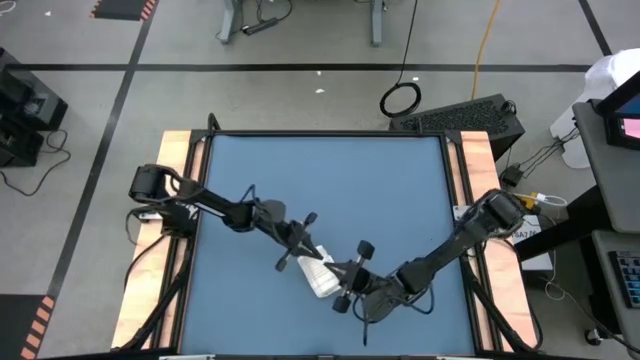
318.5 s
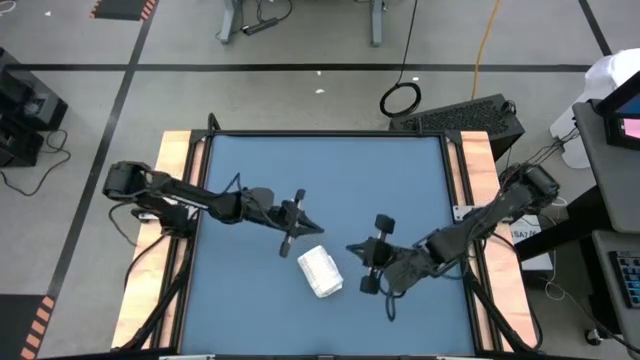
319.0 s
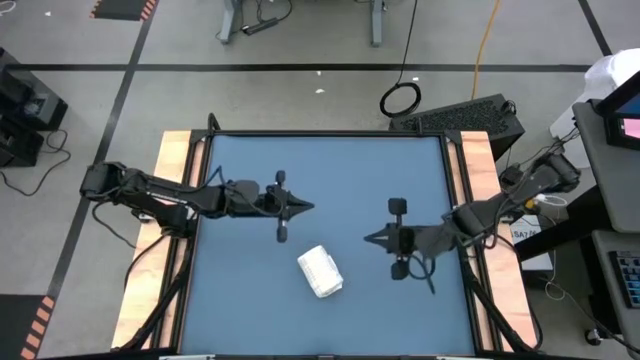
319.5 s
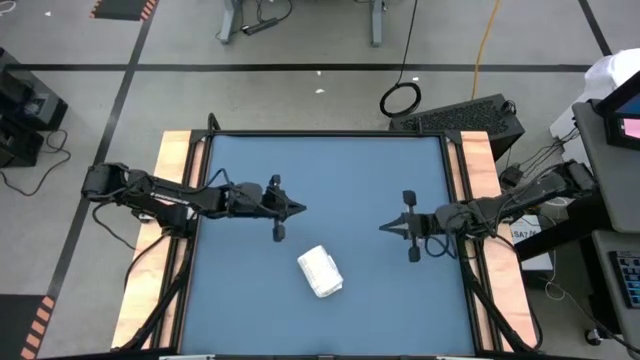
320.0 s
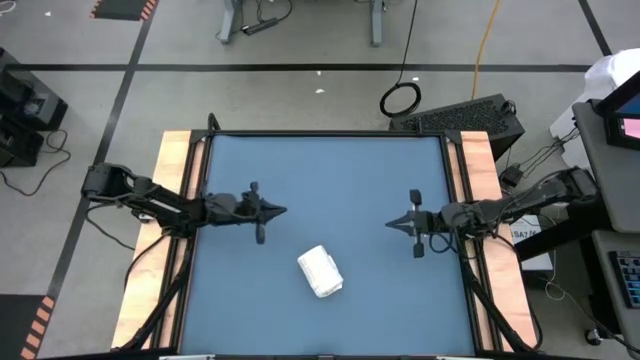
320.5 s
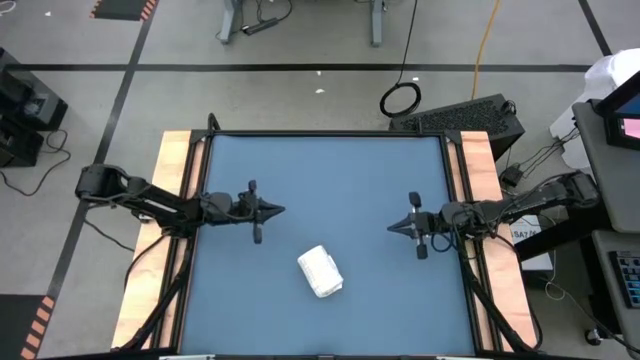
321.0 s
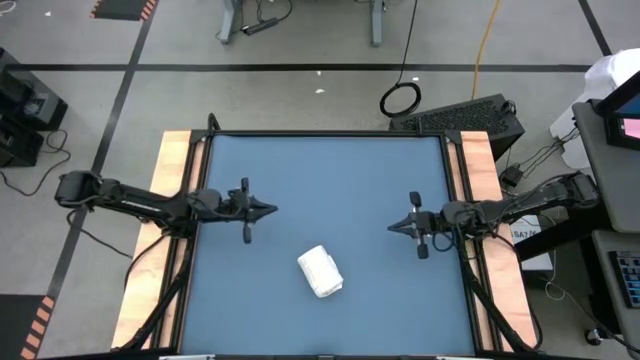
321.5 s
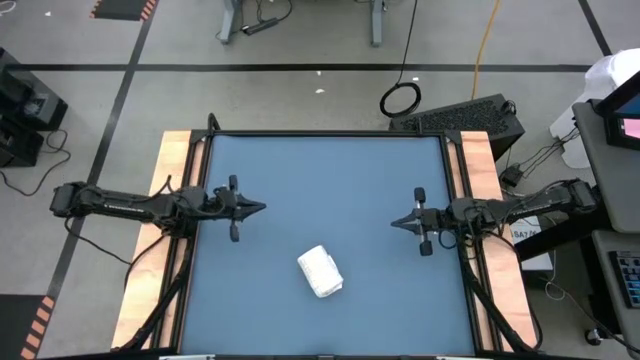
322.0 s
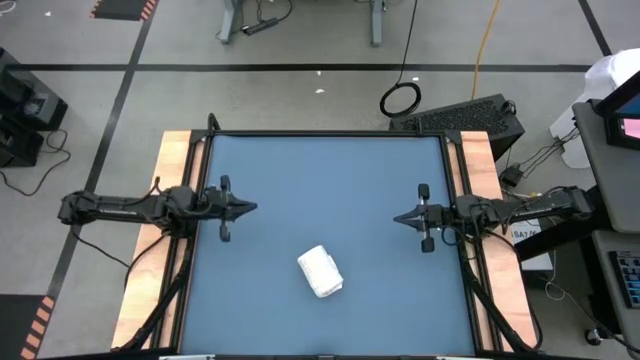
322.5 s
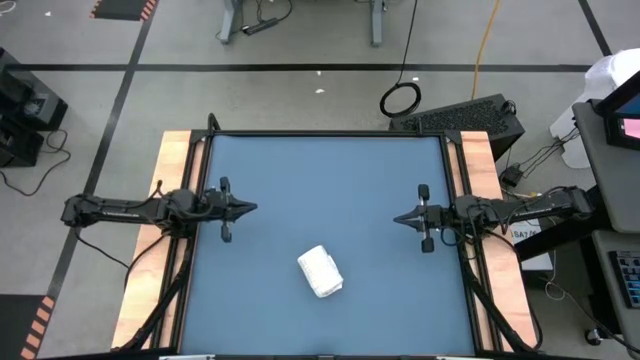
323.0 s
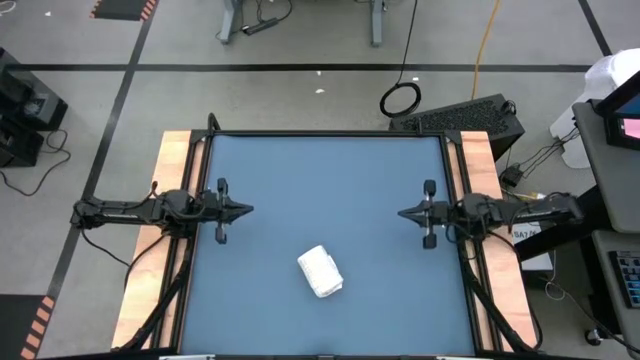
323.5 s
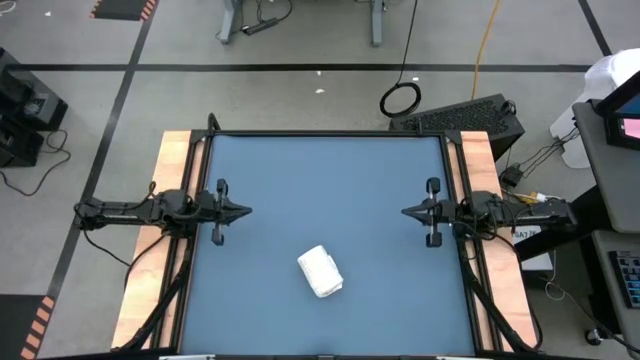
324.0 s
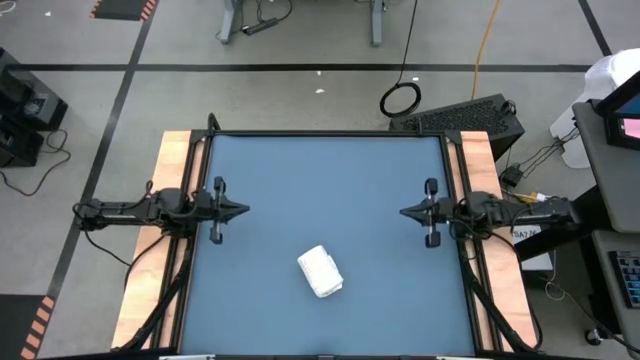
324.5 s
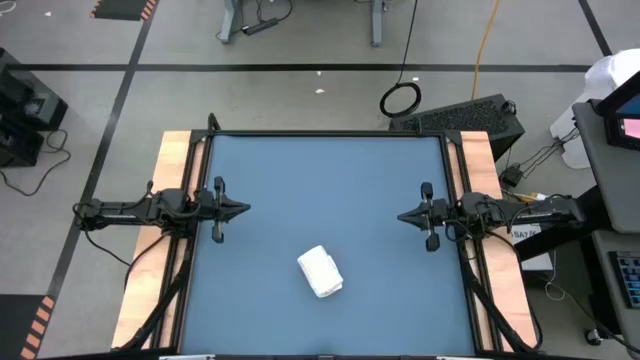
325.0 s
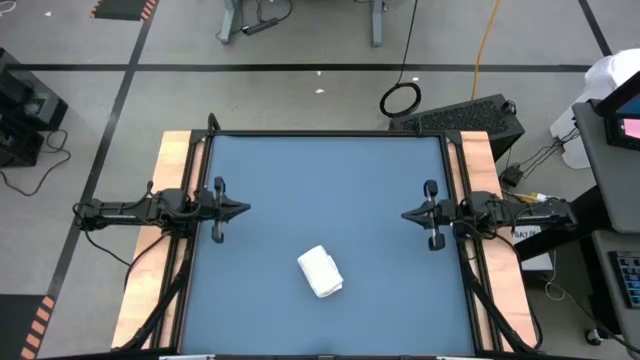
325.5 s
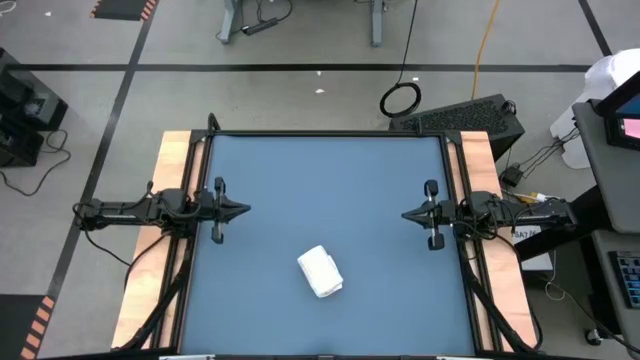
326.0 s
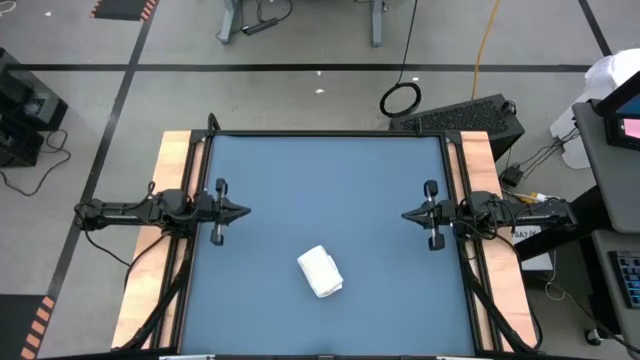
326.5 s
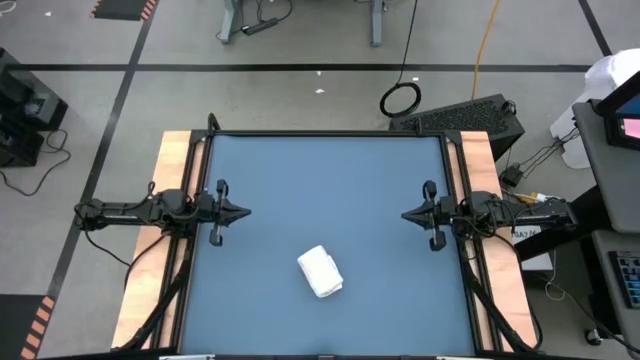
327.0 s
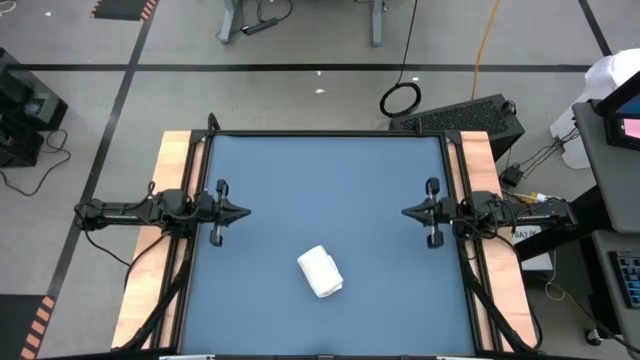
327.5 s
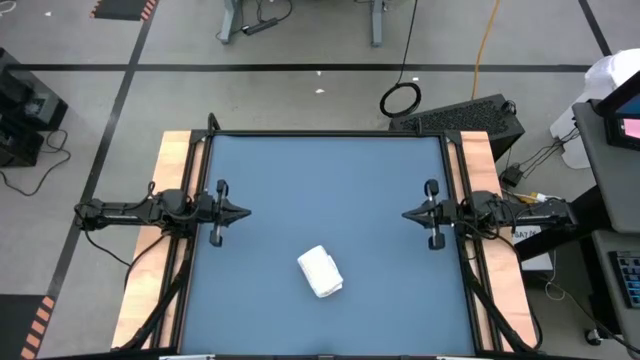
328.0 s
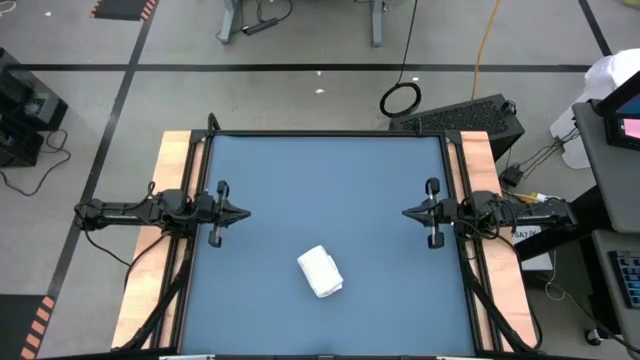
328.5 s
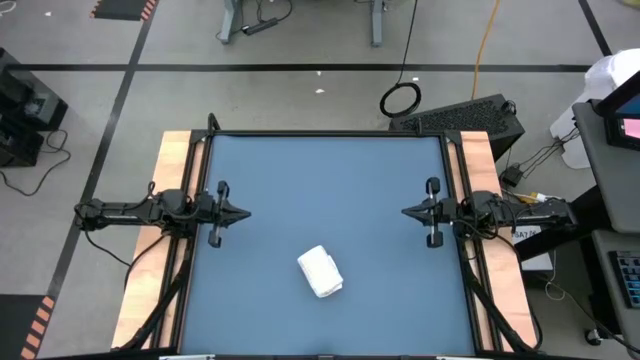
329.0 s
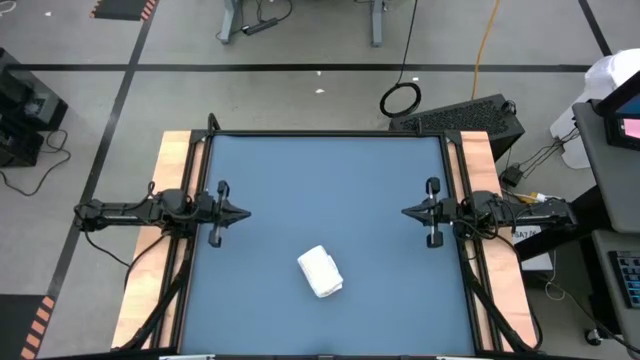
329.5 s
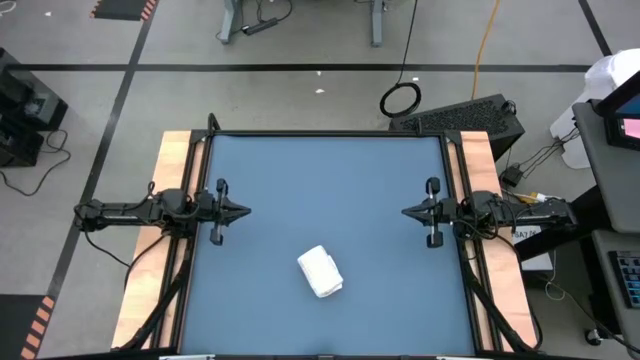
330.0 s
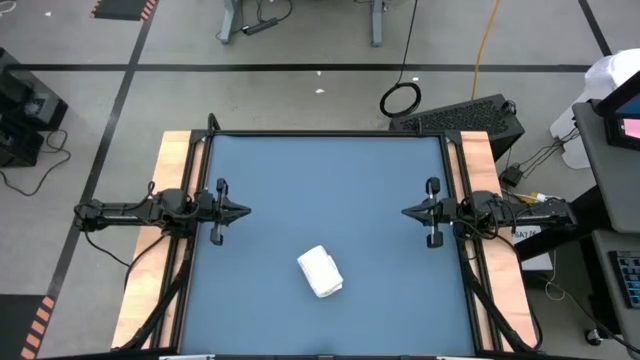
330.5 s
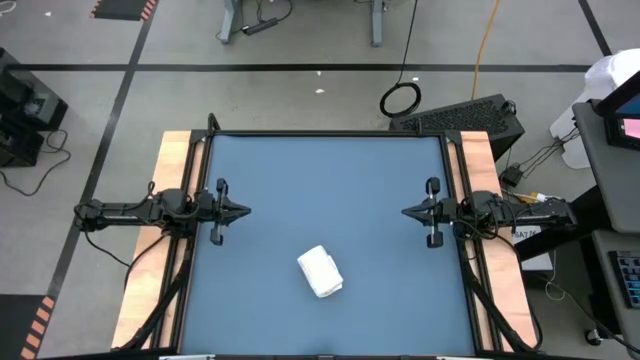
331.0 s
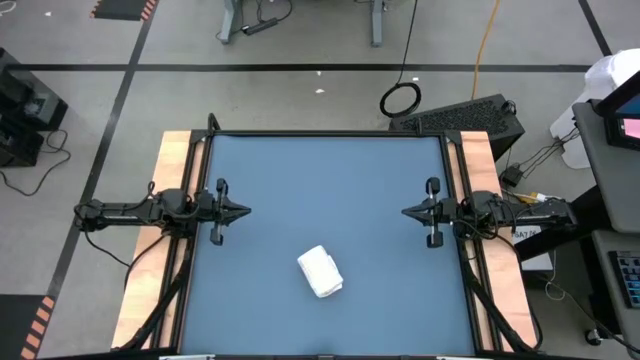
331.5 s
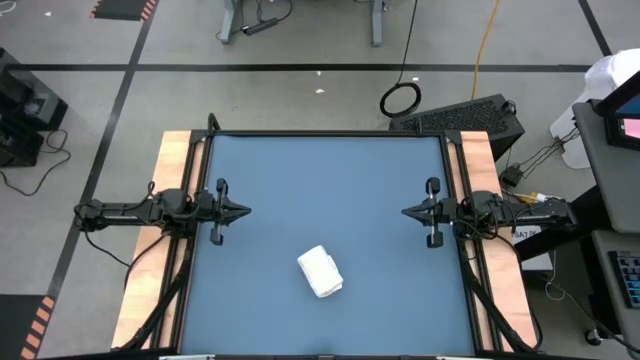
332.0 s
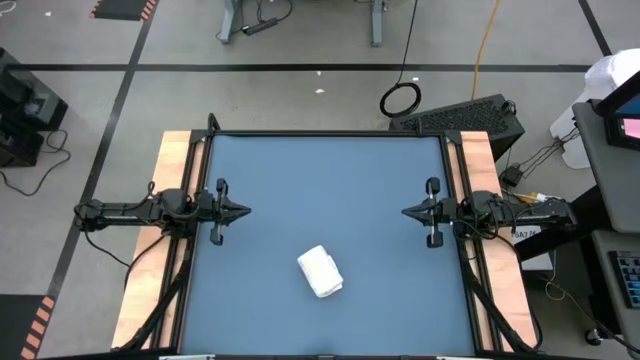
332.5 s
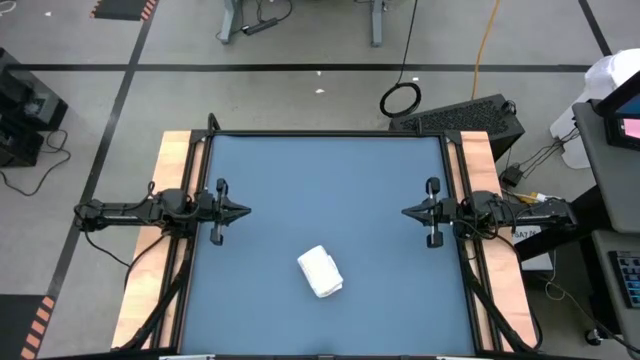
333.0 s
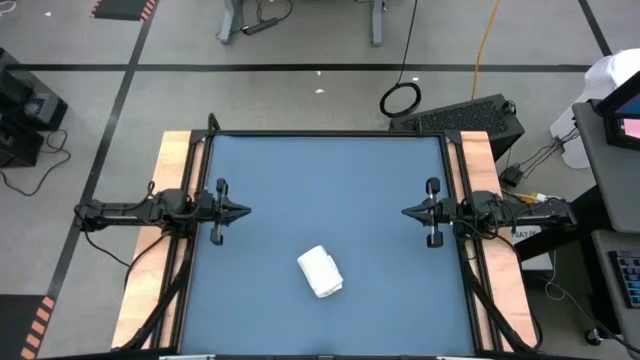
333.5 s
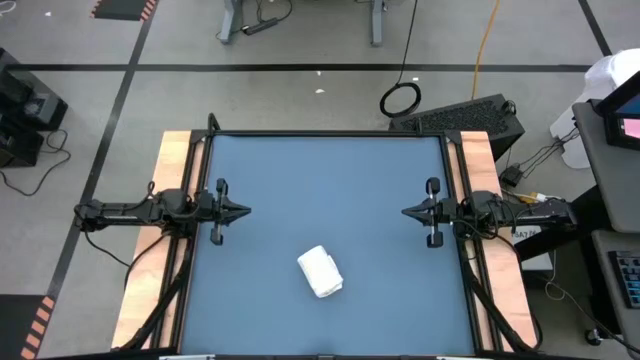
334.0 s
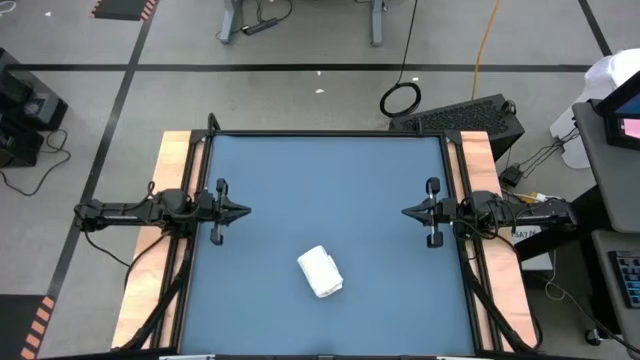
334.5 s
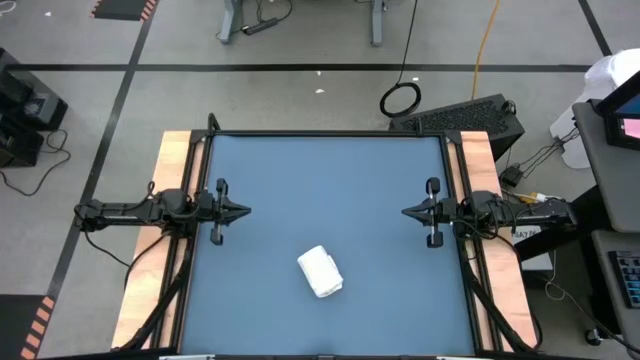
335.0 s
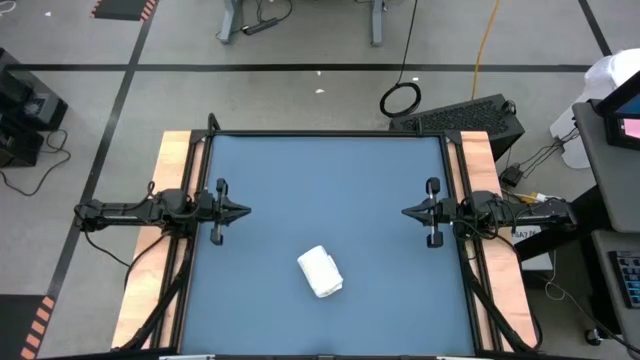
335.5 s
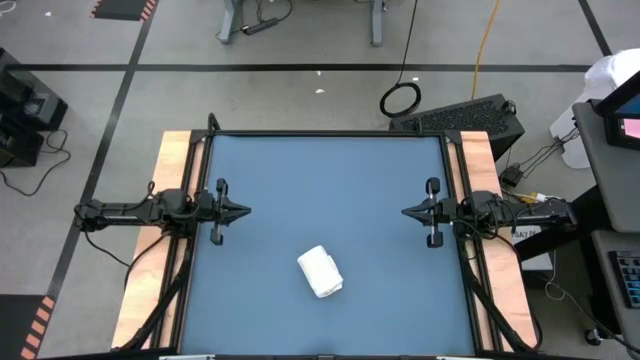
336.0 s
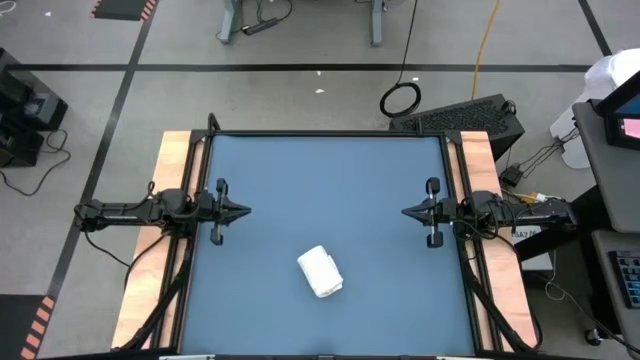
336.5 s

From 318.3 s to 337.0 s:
Task: Roll towel into tight, uniform cylinder
Return to Home Position

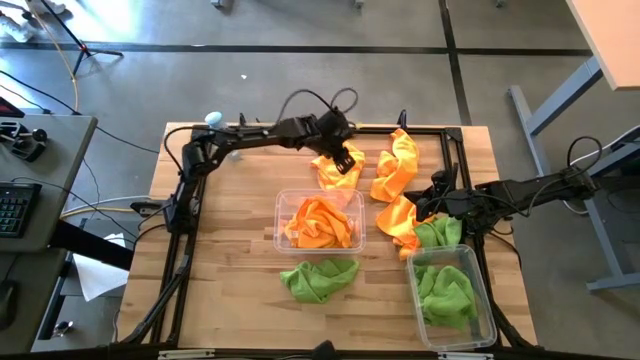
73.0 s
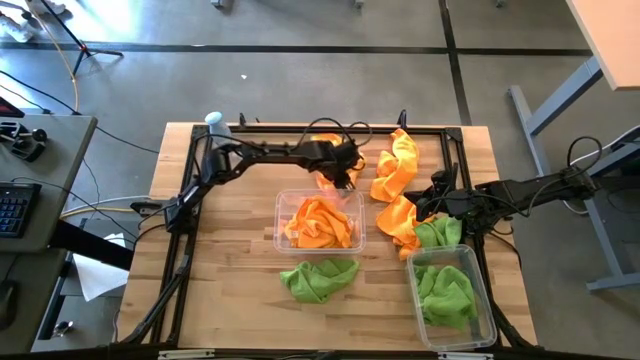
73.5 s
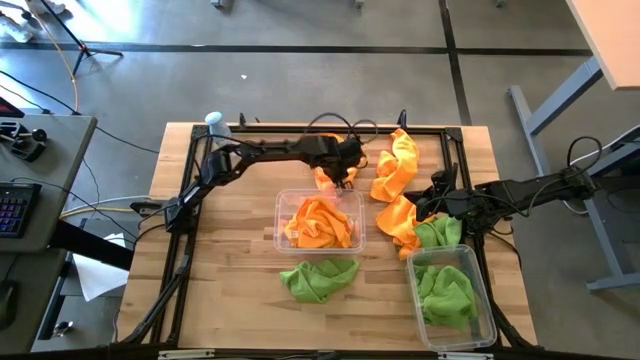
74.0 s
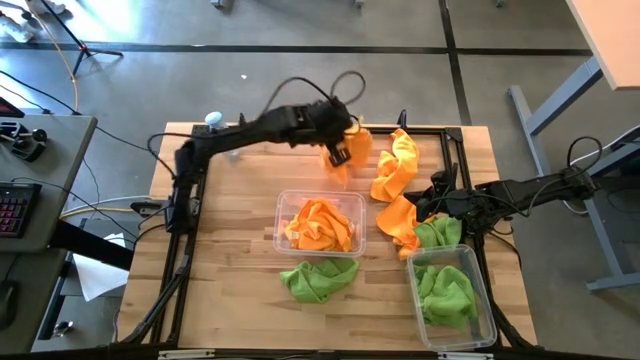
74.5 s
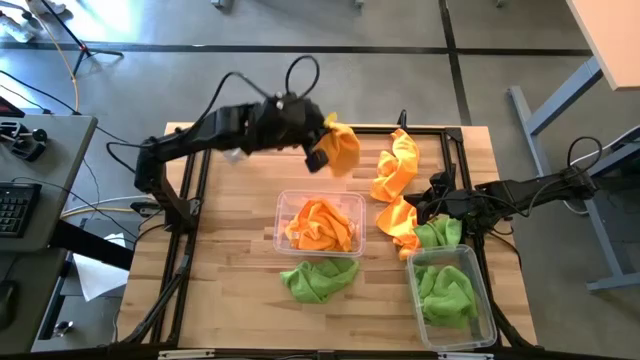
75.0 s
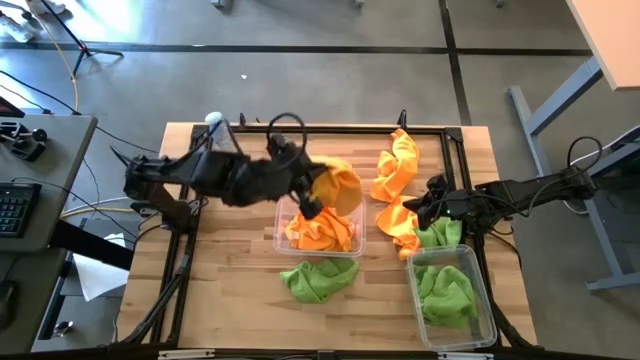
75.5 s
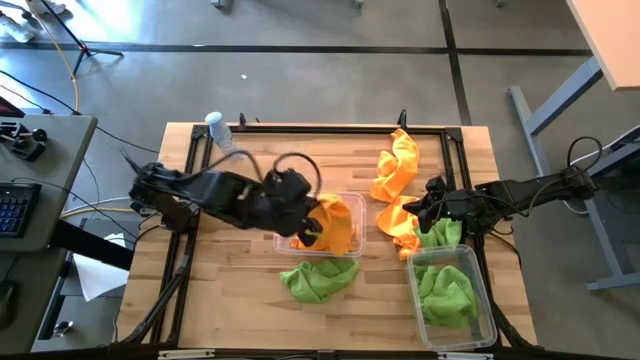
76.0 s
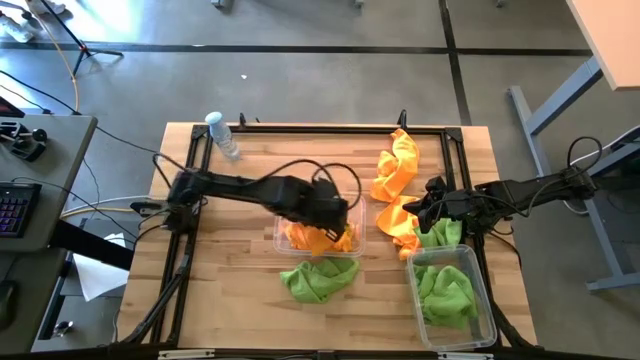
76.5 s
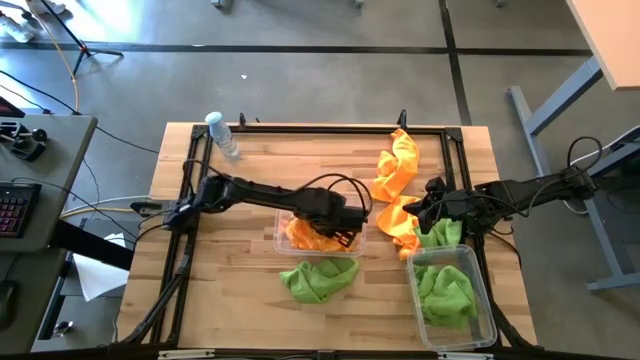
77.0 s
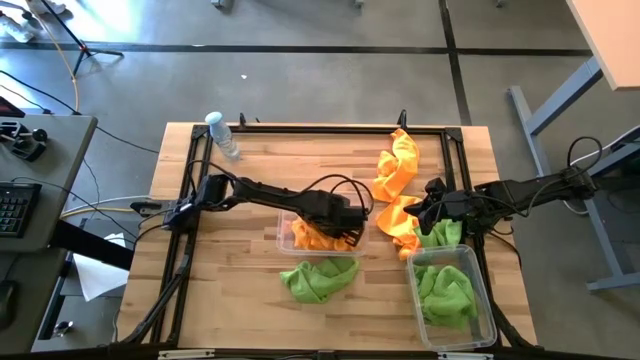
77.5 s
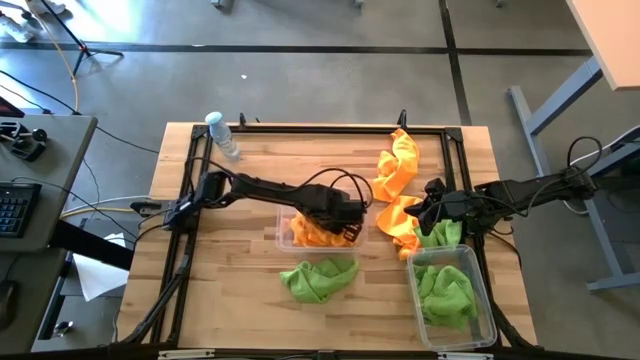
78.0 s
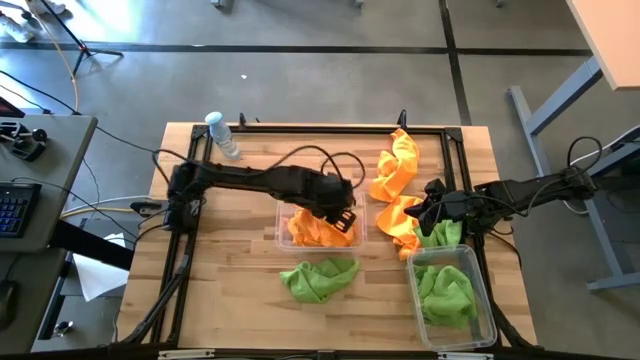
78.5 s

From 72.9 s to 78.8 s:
Task: Sort microfiber towel by color & place in baskets
Put the top left orange towel into the top transparent bin
